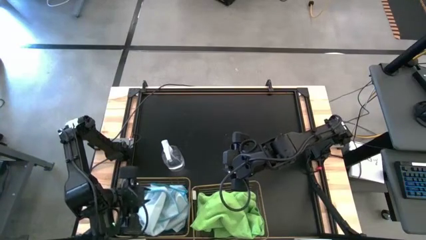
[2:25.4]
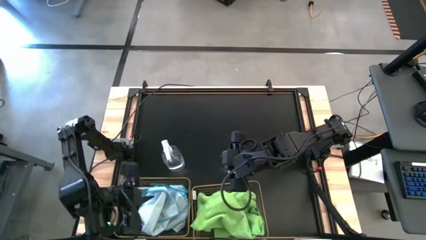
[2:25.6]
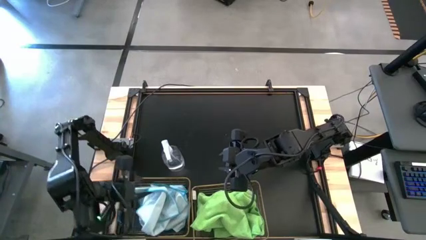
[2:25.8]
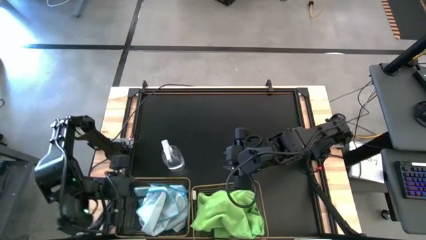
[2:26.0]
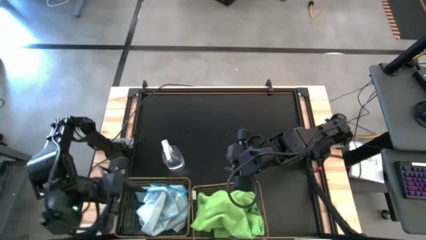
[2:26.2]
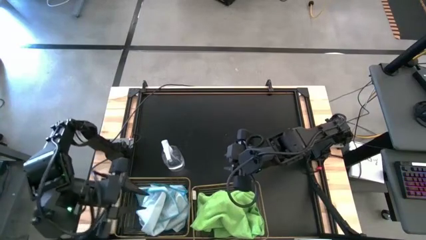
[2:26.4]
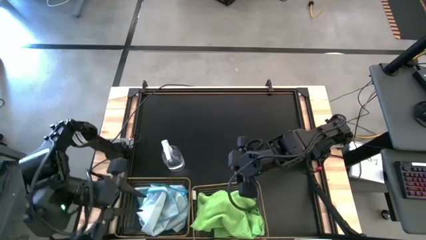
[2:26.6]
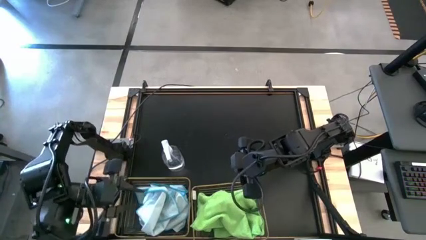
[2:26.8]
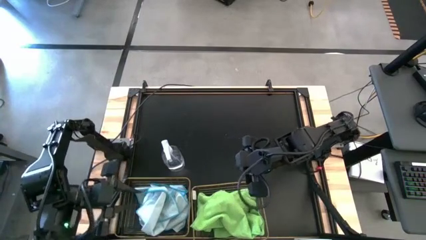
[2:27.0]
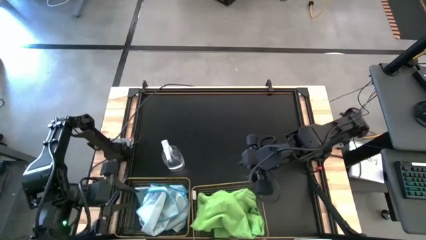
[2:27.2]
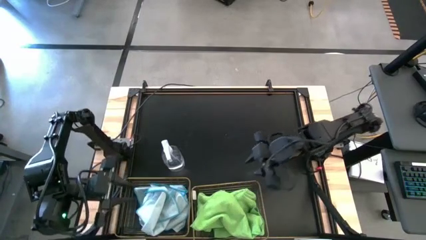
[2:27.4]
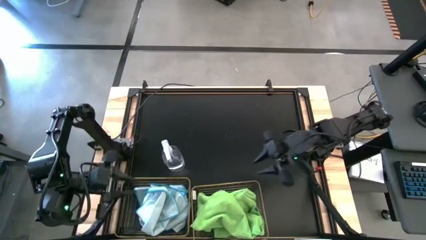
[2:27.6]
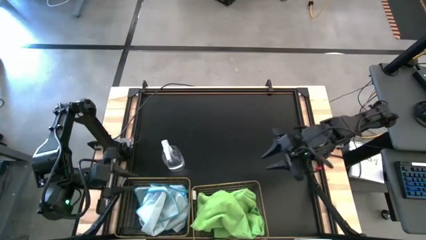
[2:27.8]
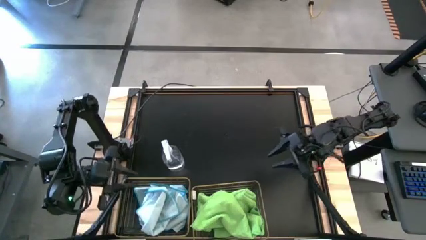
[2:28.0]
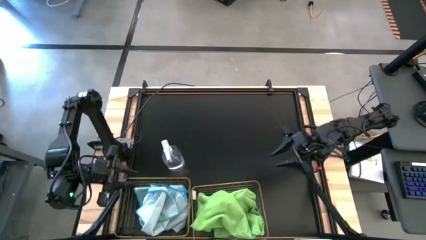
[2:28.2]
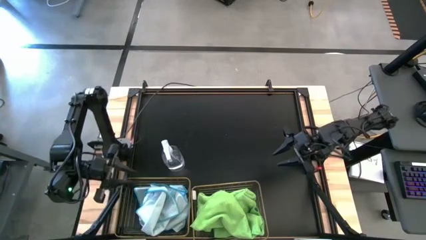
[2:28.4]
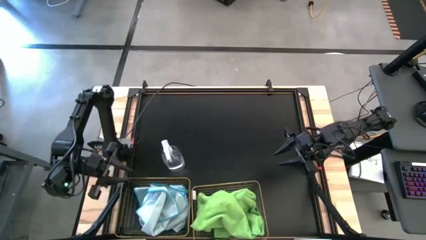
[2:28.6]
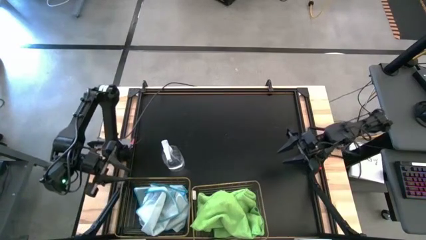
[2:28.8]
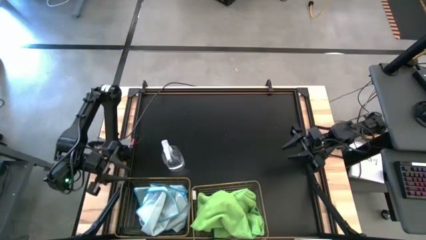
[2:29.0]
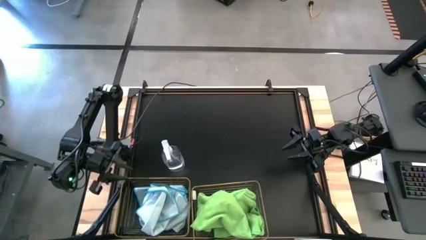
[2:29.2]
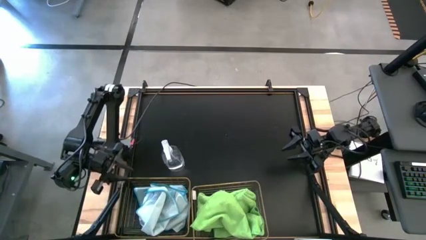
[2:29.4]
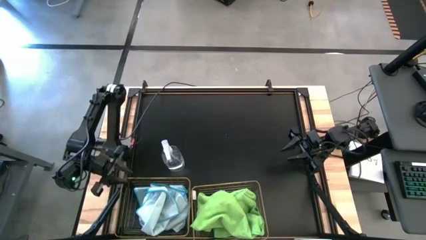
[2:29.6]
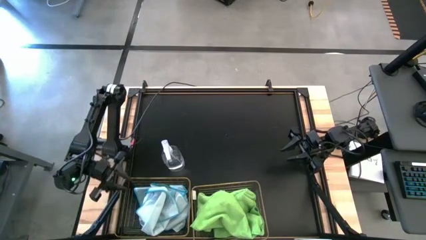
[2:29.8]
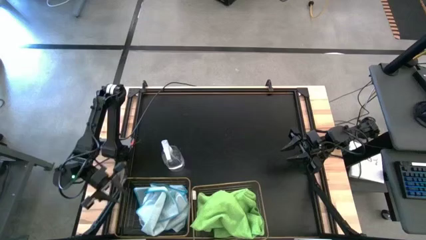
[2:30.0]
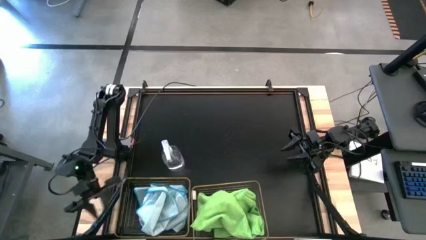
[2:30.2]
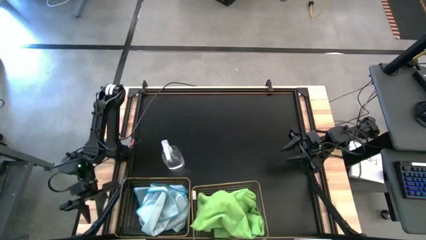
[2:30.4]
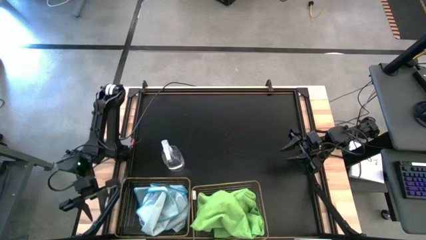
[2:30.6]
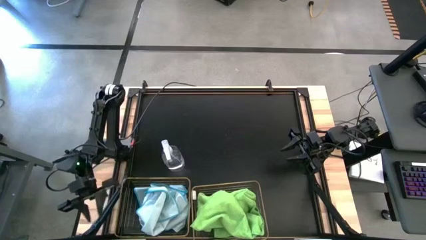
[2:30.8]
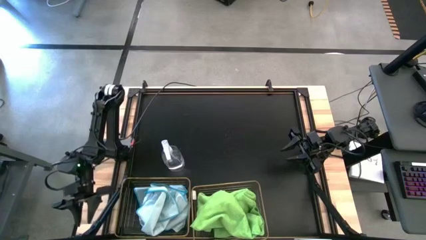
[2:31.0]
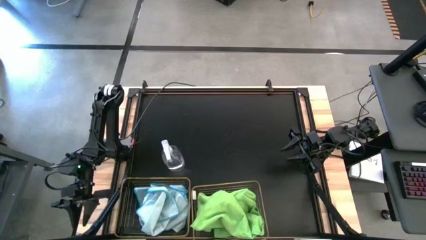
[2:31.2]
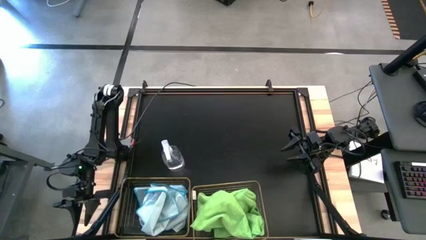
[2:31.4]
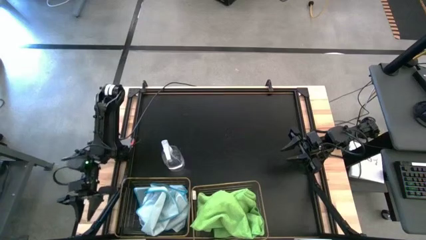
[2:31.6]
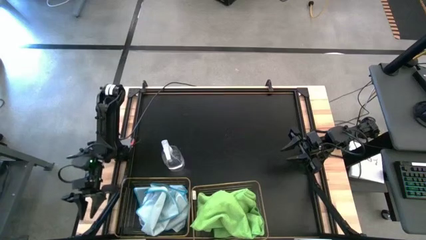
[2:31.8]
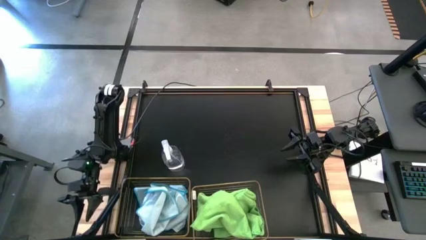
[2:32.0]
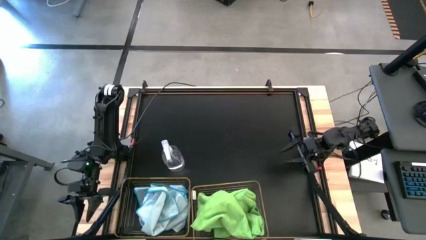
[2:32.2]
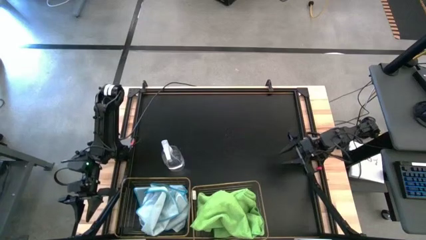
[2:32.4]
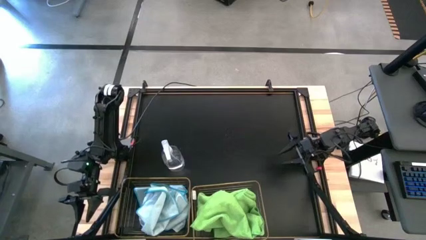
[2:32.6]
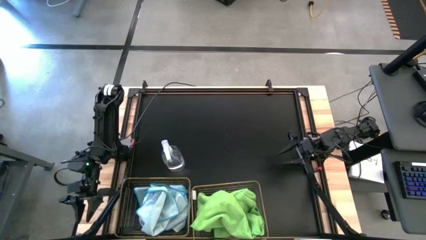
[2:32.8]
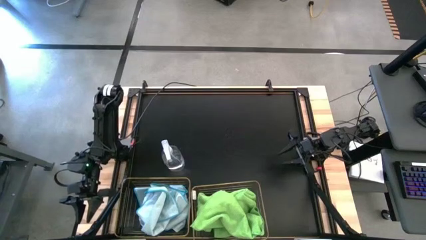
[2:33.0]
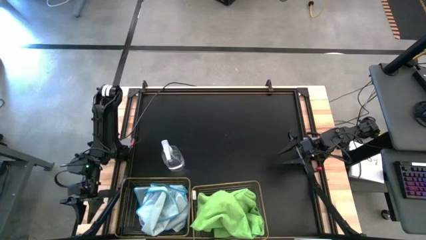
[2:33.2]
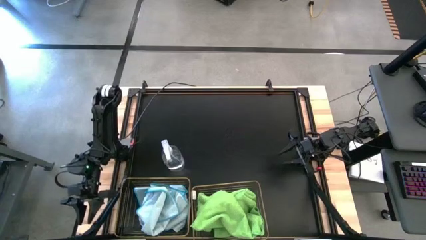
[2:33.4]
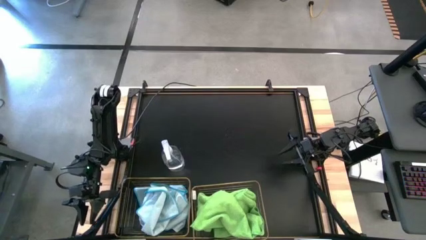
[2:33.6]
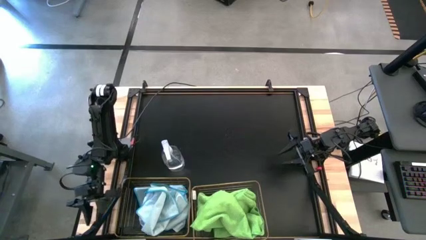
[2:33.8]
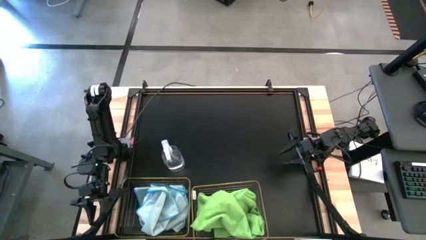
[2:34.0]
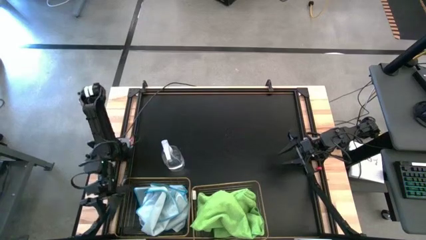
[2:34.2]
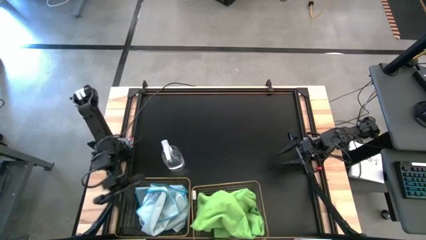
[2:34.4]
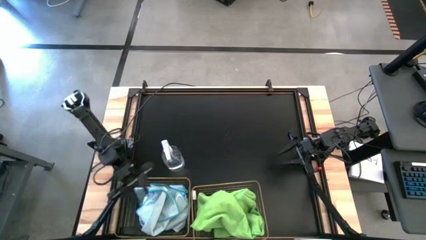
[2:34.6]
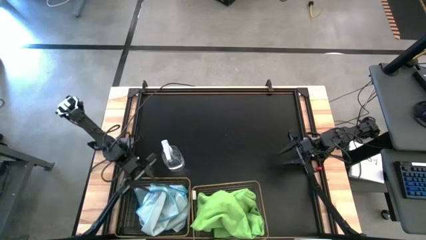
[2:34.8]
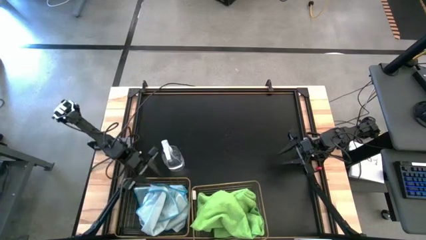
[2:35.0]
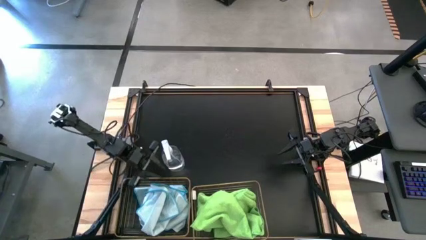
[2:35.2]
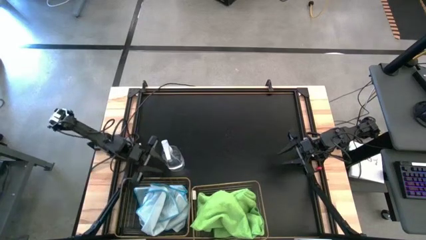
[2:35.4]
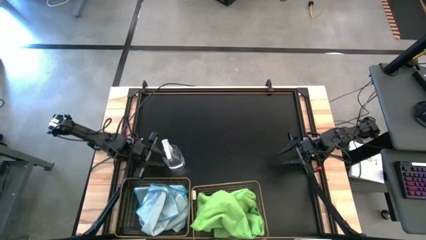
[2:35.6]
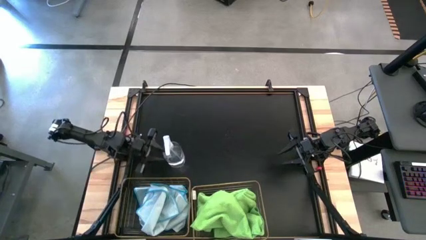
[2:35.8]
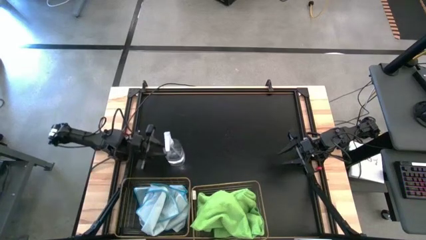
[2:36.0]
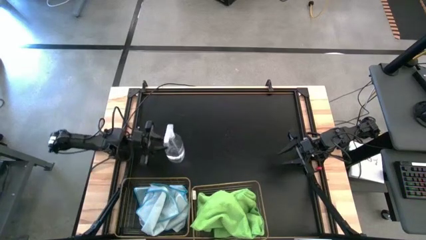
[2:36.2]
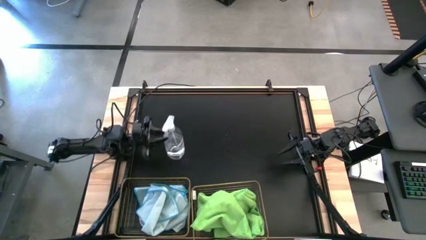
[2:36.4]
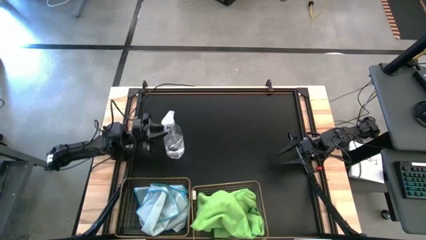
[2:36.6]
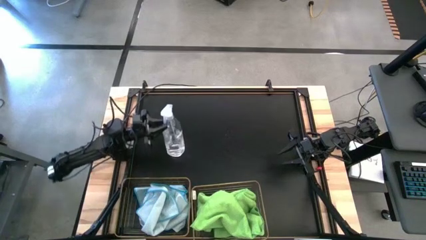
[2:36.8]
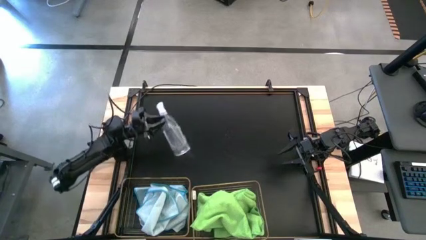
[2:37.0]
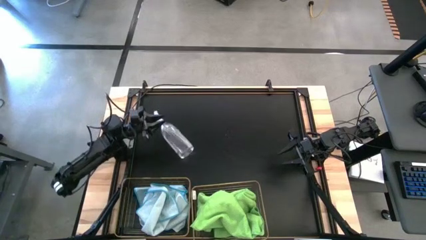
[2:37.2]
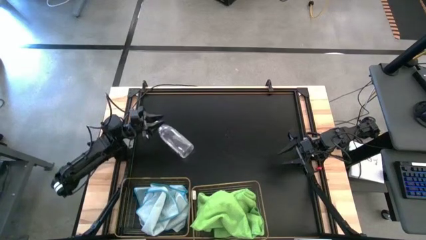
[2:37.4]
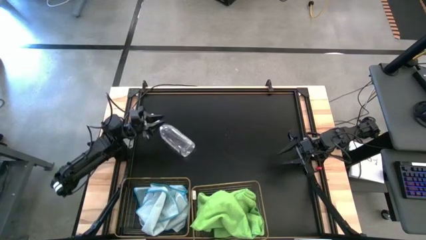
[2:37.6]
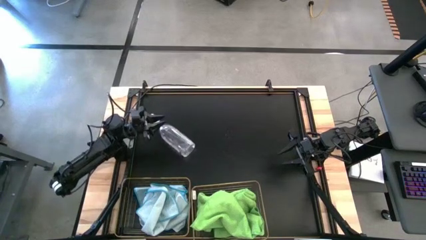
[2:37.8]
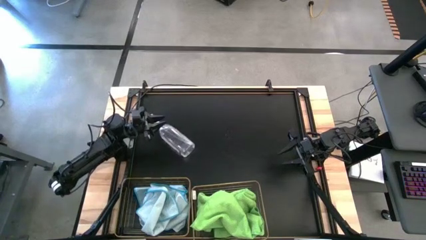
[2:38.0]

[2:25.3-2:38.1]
Task: Sort microfiber towel by color & place in baskets
Return to Home Position

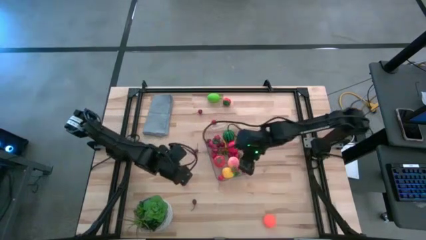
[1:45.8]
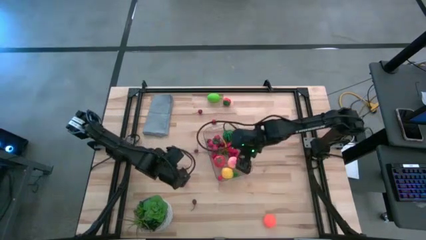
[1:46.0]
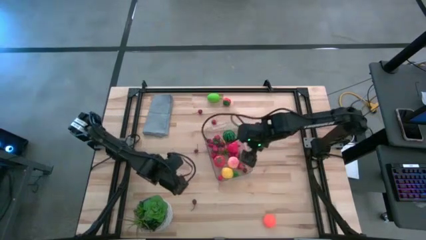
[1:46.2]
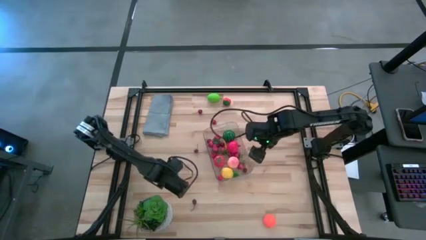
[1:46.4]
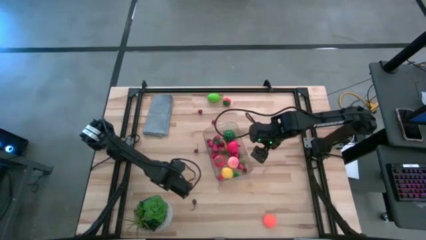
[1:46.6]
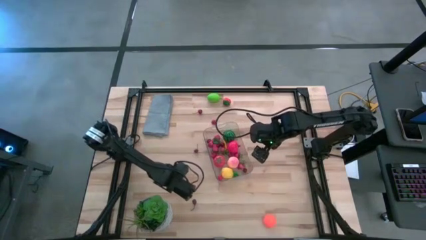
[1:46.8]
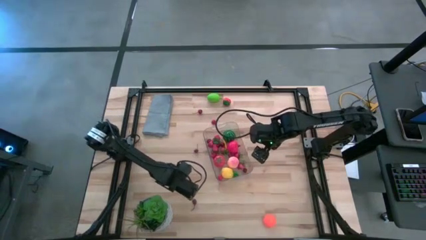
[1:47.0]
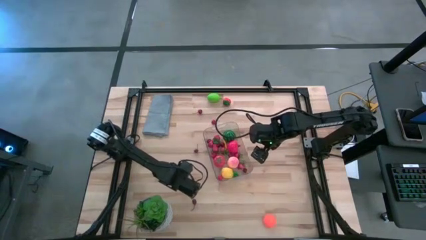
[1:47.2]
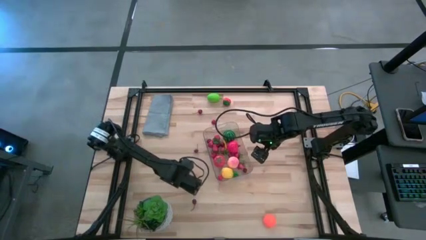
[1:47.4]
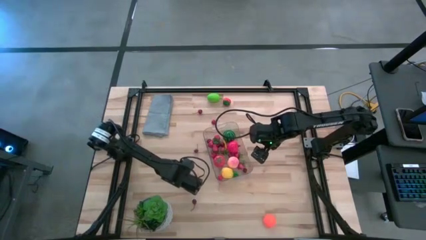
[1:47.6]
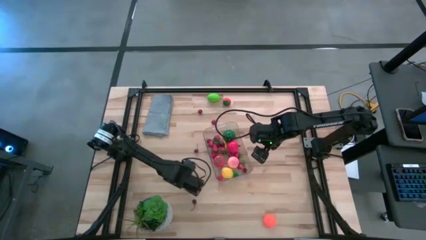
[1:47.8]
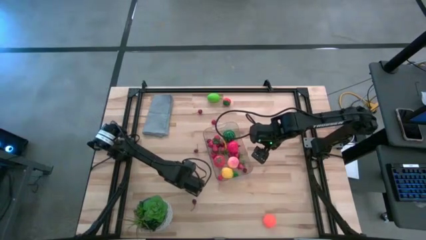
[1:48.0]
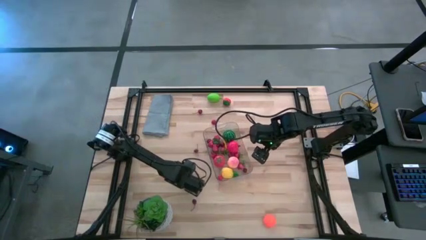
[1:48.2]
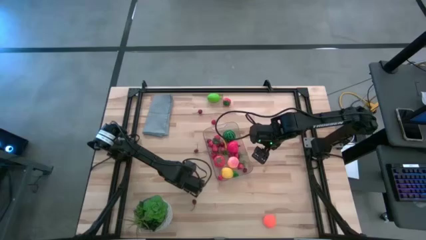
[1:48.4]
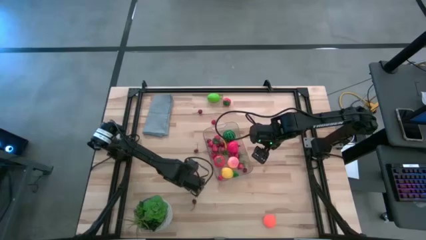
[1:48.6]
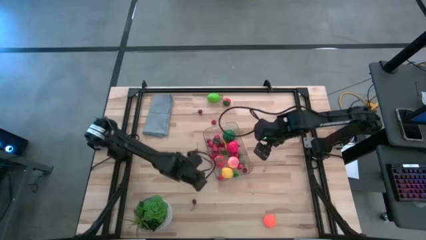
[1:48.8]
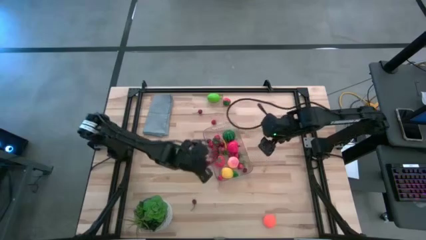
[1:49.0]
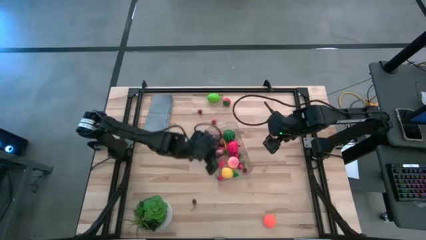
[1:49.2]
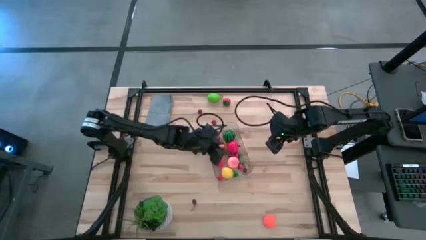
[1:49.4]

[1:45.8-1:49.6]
Task: Pick and placing Produce into tupperware
Put the small pink peach into the transparent bin
